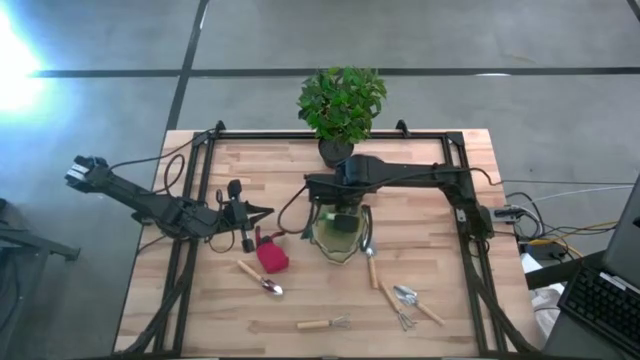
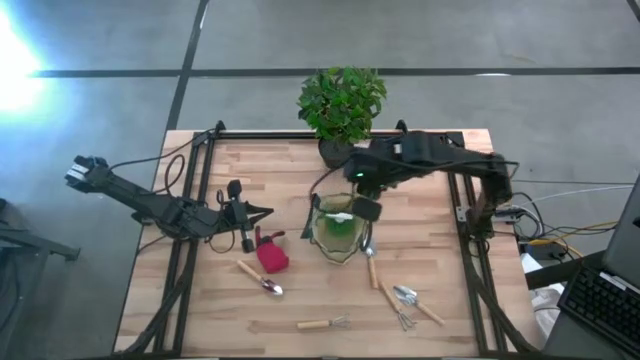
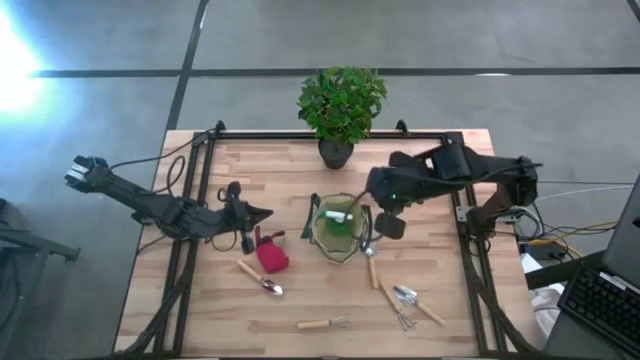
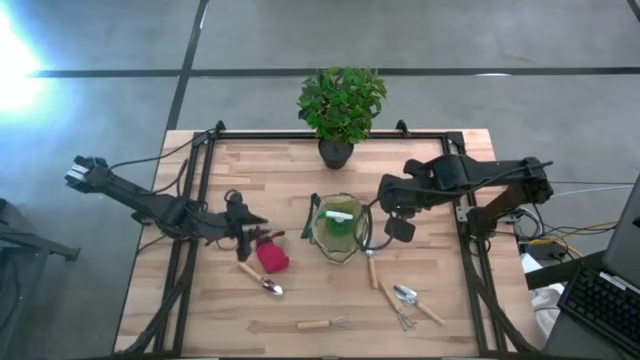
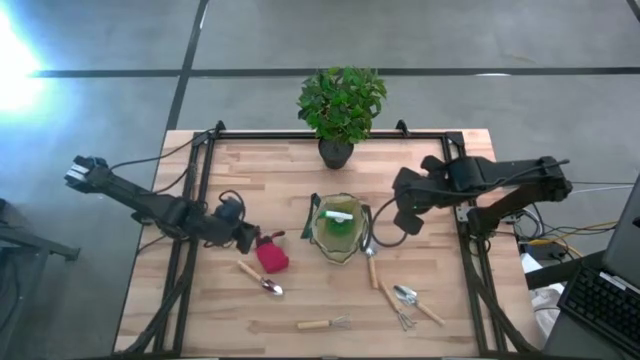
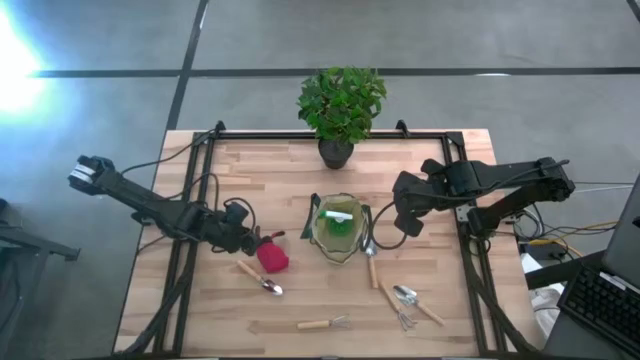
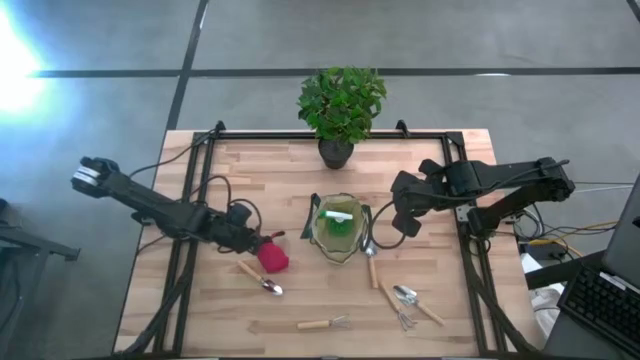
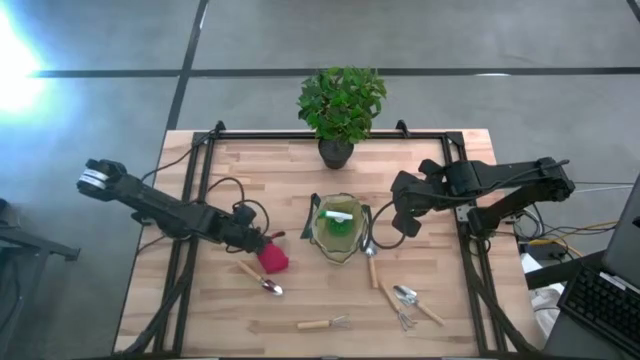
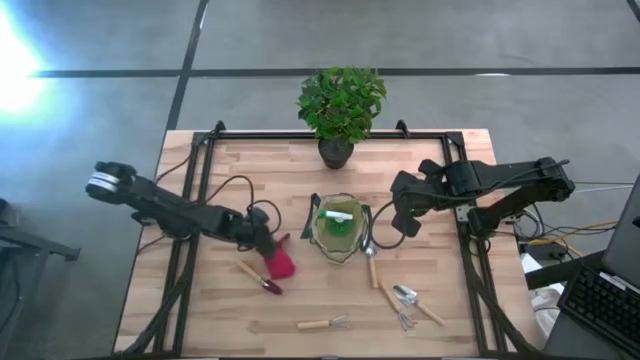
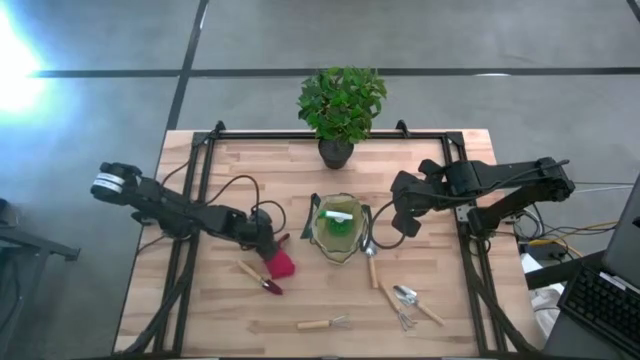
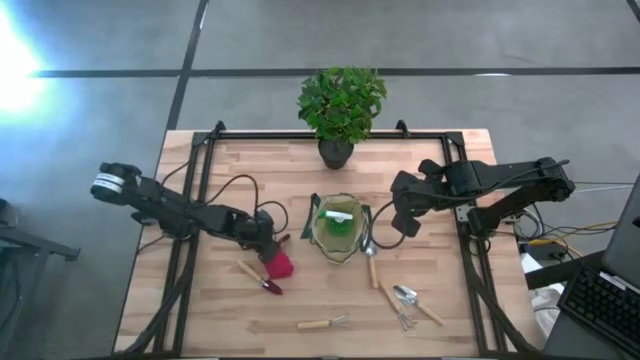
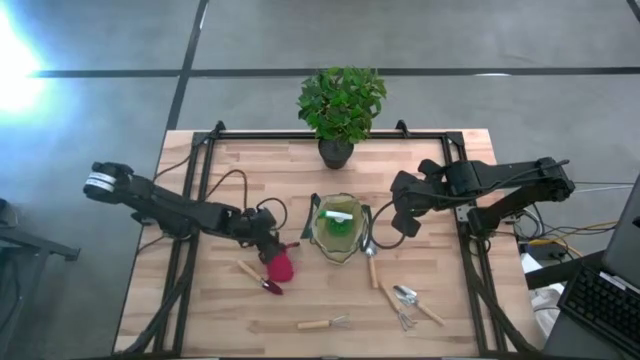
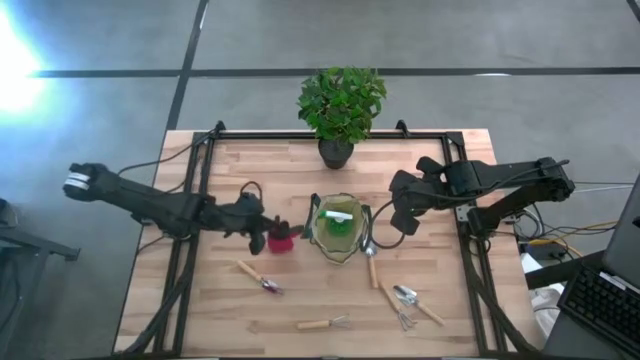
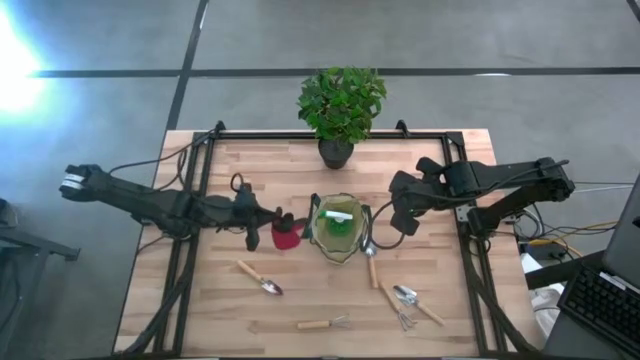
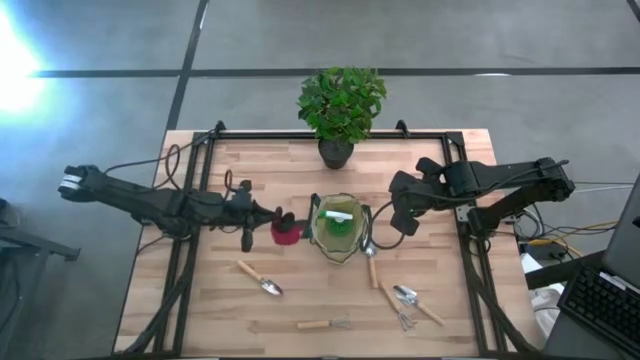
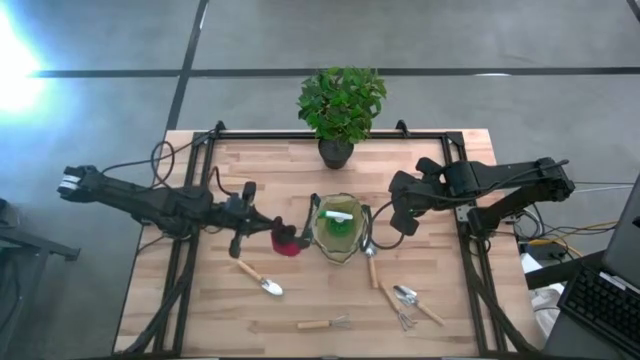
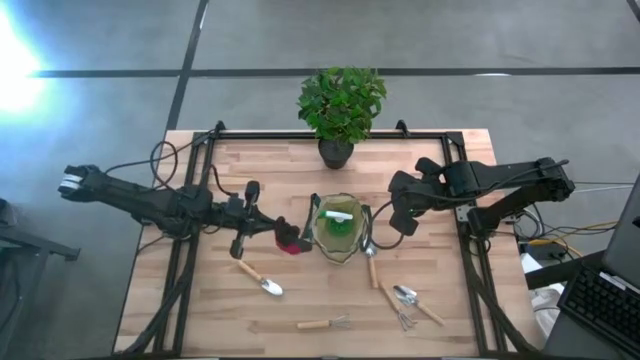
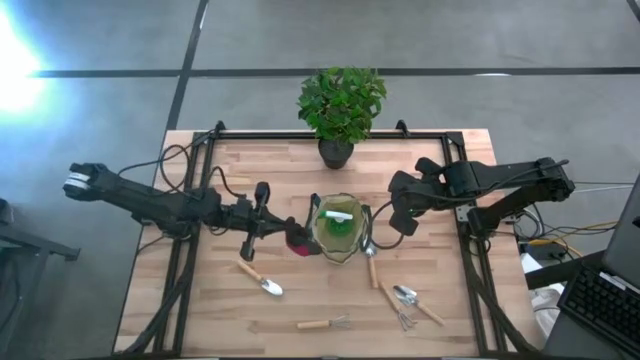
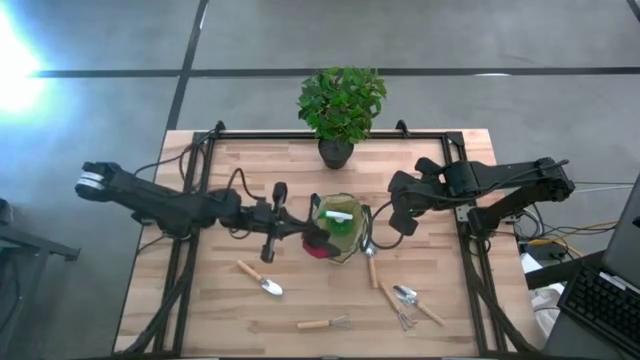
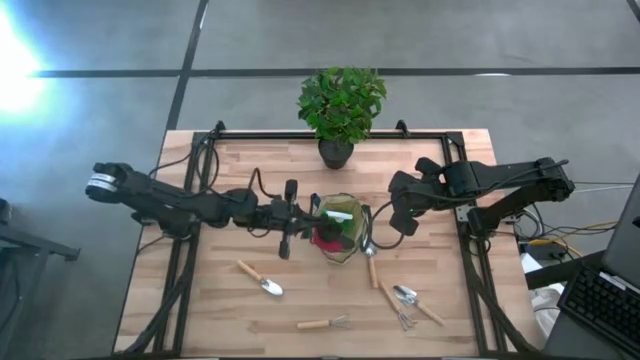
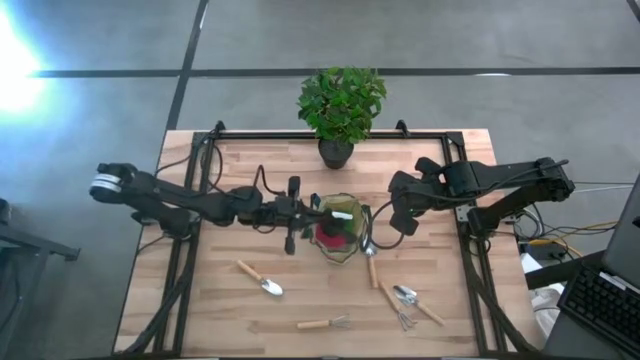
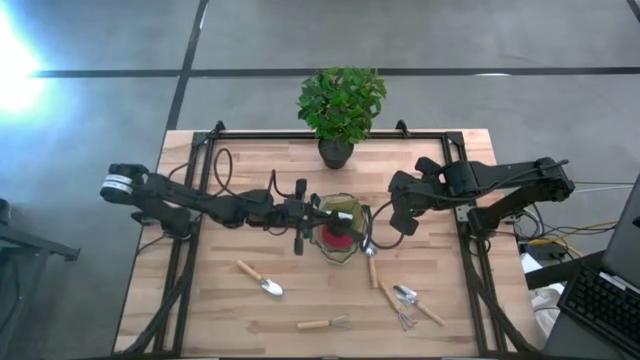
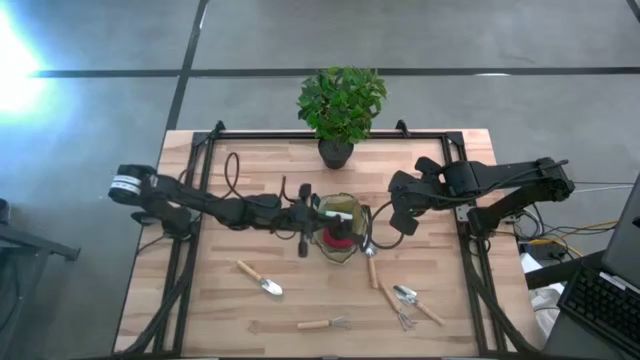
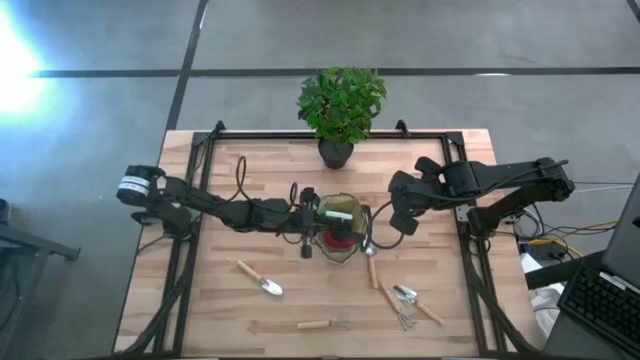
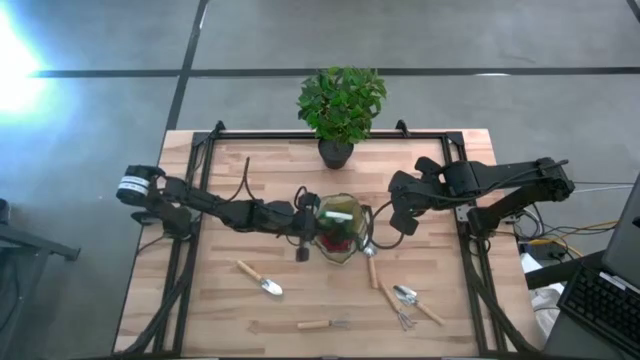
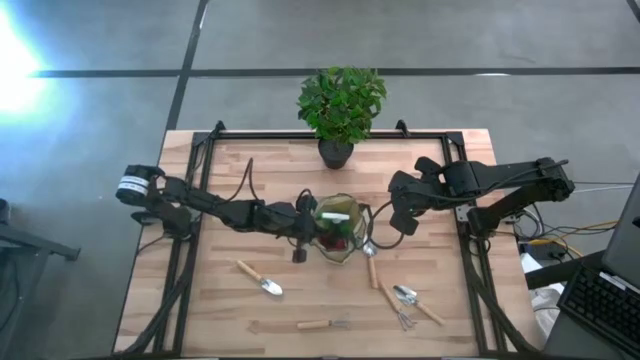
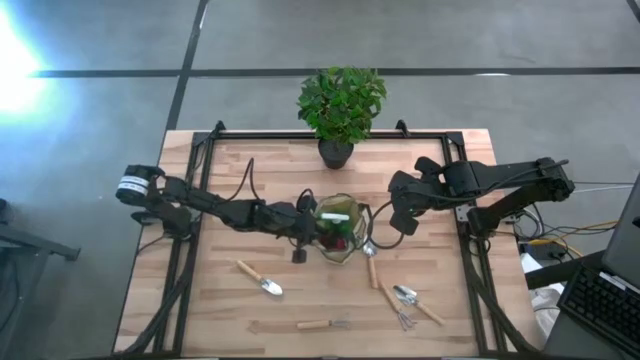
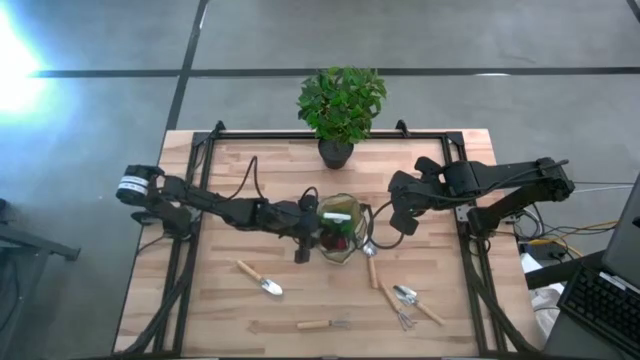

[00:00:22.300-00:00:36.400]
Task: Pick & Place Garden tools in Gardening bag
Put the red gloves into the gardening bag

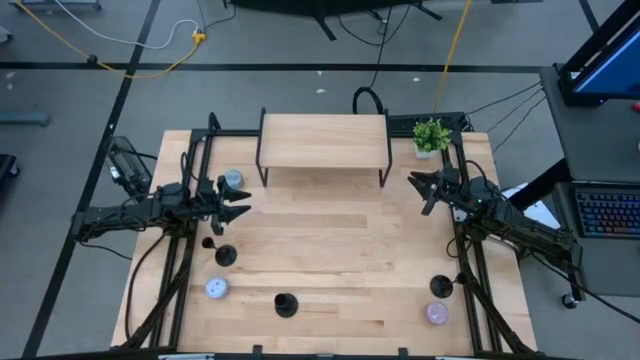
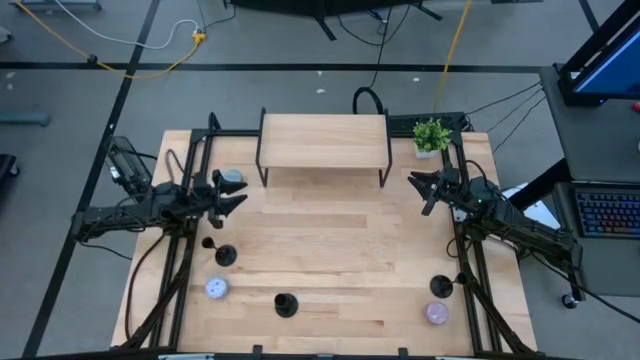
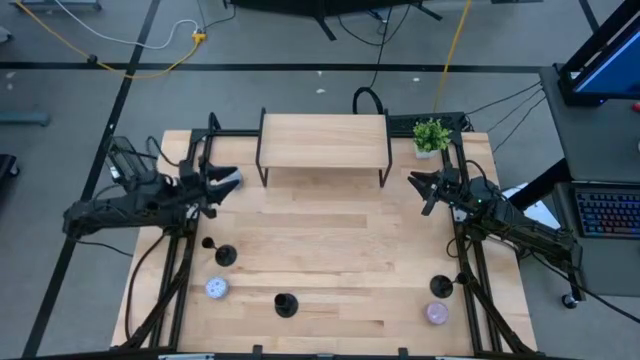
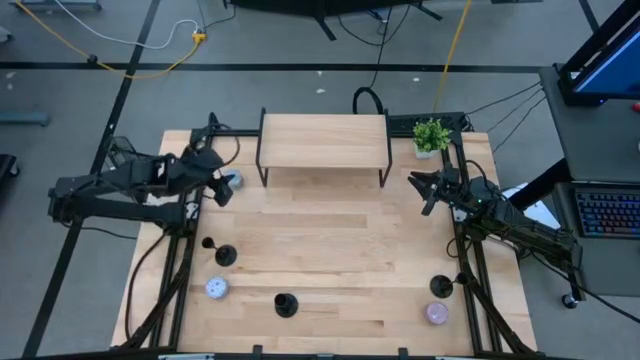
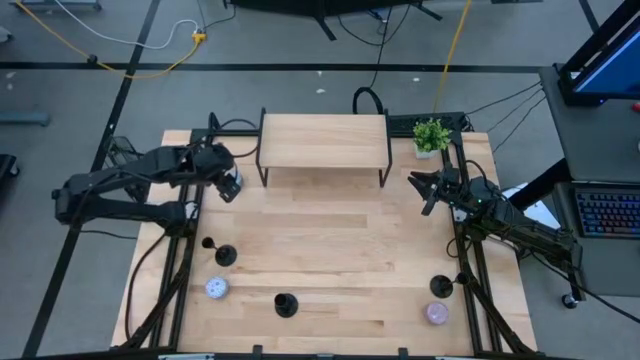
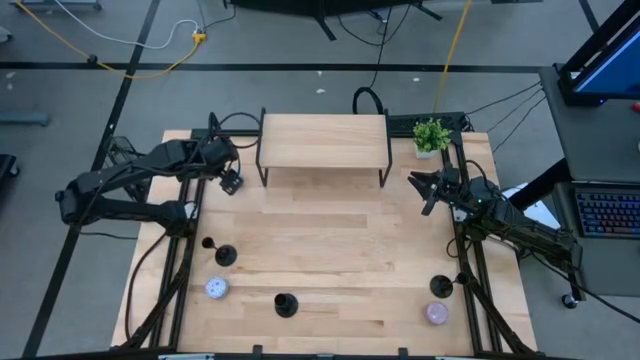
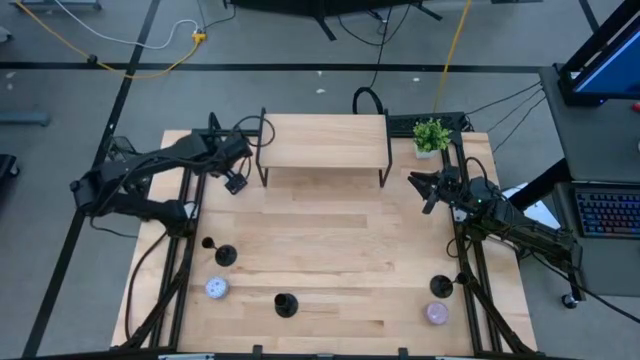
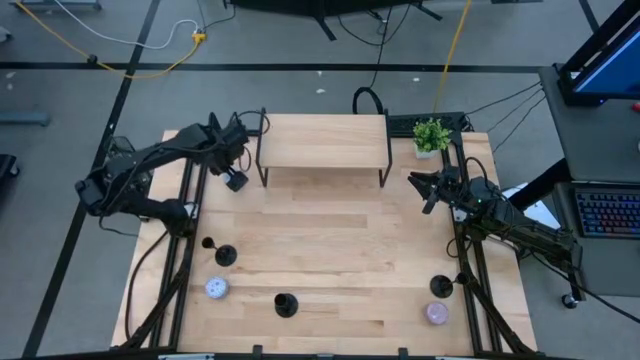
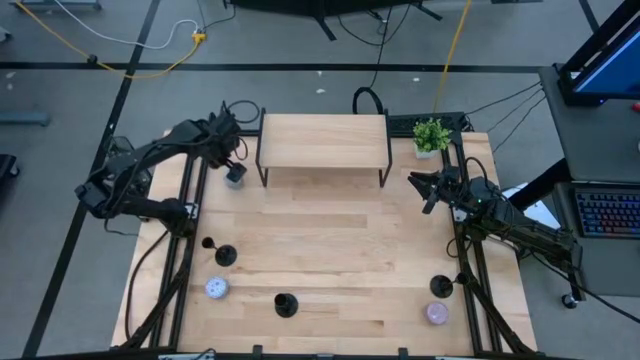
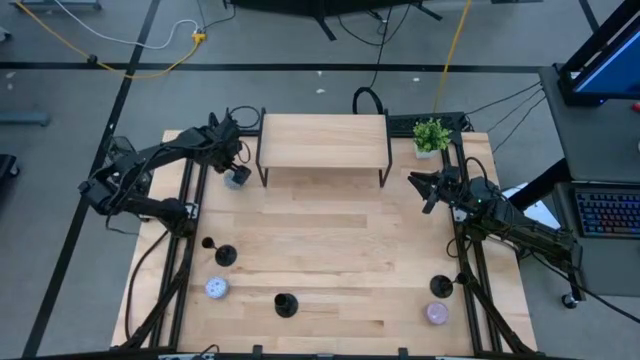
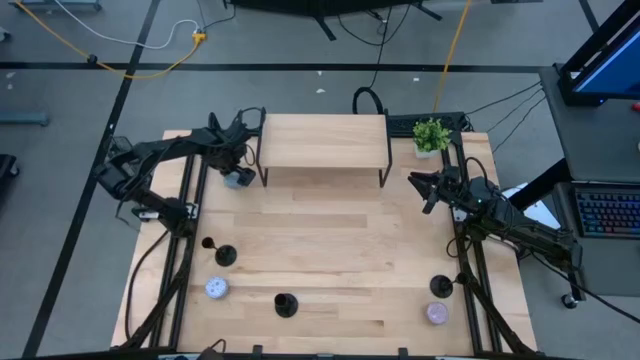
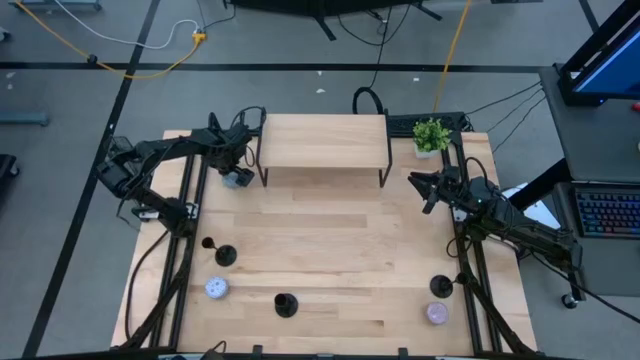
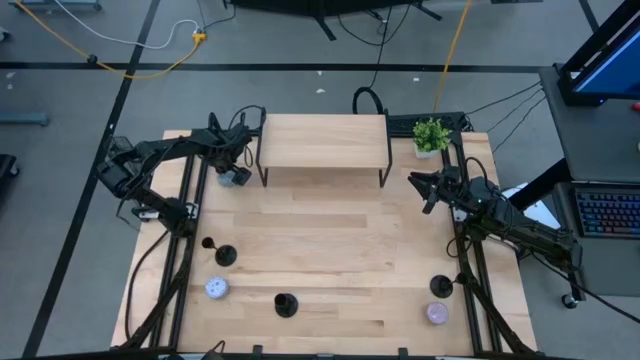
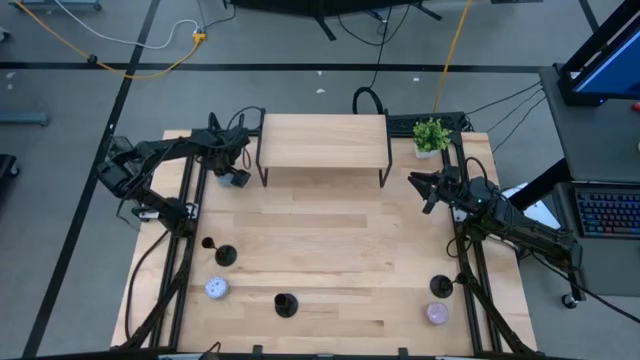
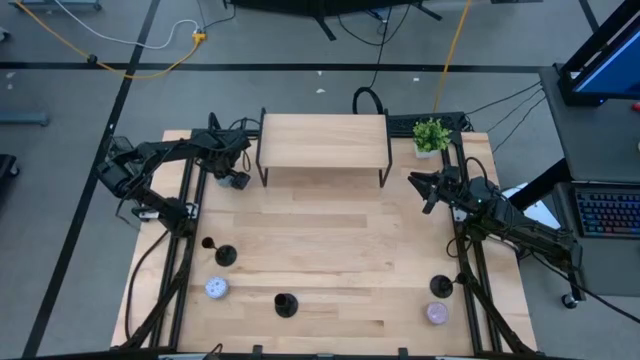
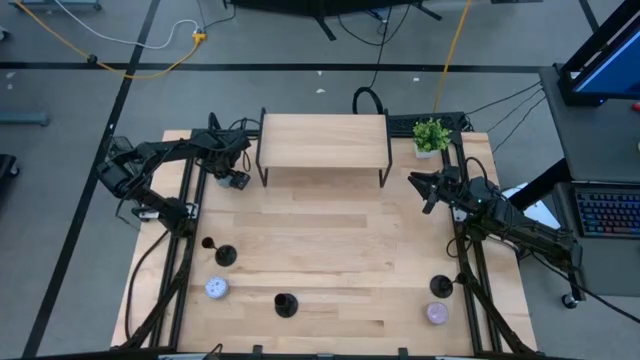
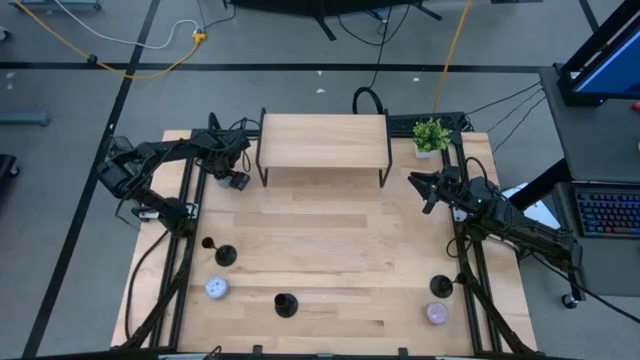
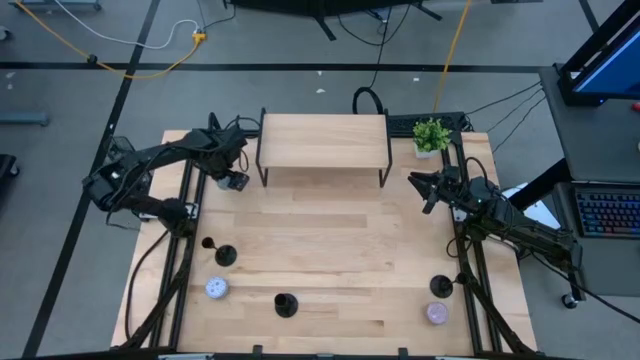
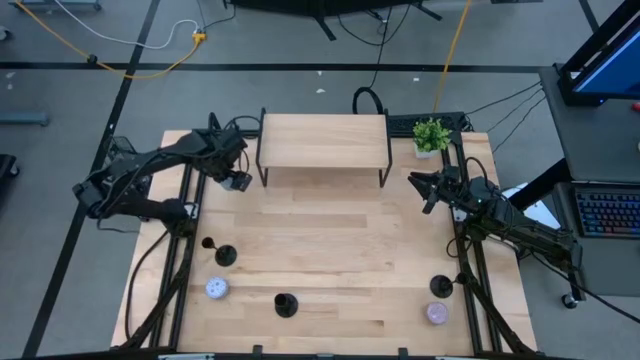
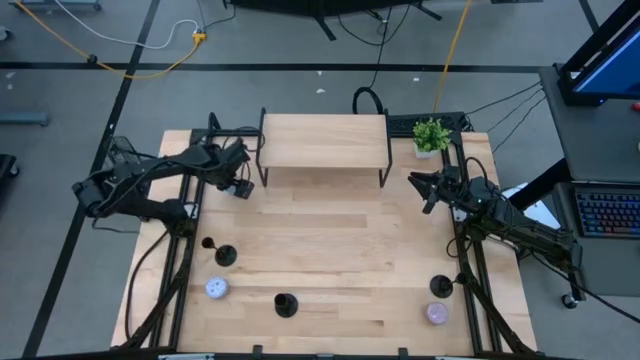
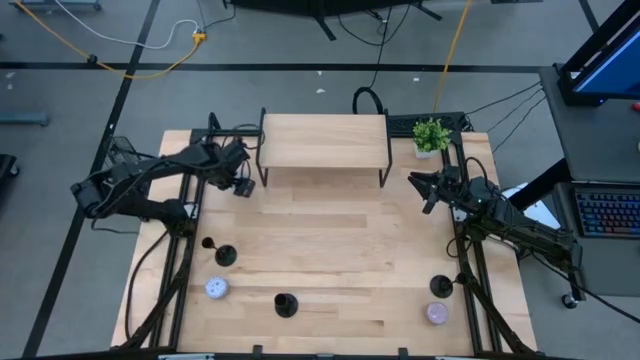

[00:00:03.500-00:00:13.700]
Task: Pick & Place candle stick holders
Put the blue scented candle on the shelf
